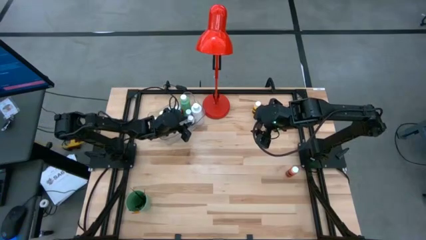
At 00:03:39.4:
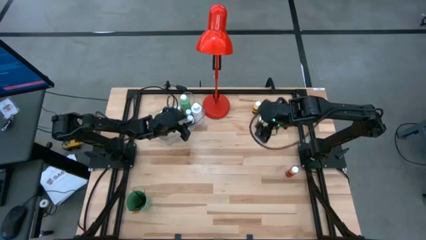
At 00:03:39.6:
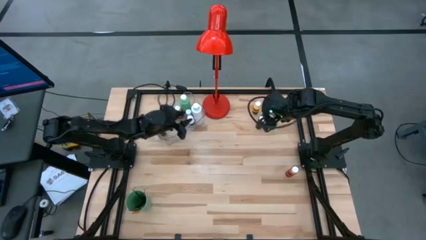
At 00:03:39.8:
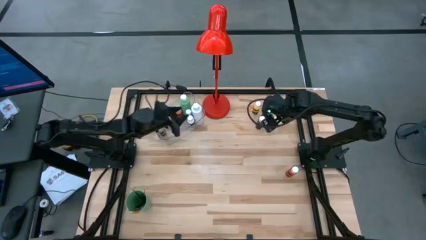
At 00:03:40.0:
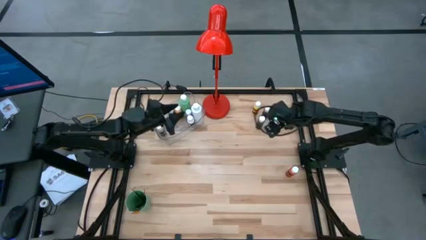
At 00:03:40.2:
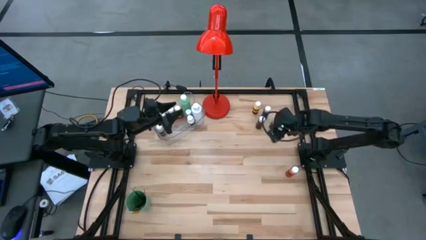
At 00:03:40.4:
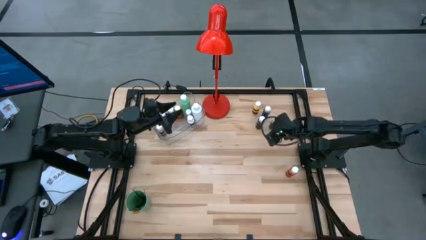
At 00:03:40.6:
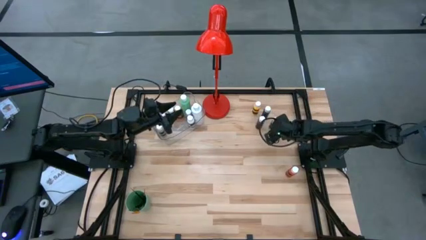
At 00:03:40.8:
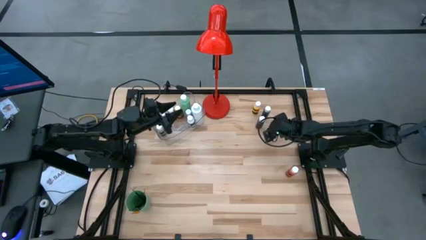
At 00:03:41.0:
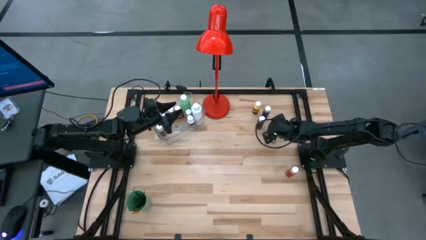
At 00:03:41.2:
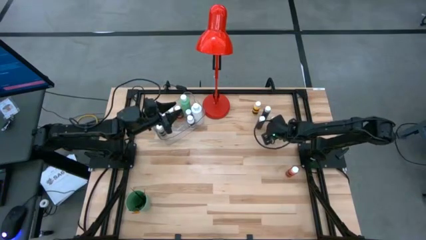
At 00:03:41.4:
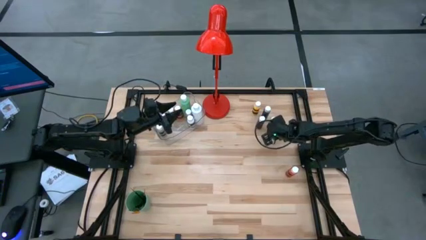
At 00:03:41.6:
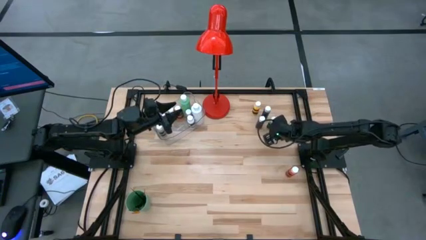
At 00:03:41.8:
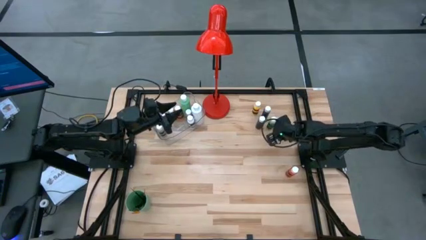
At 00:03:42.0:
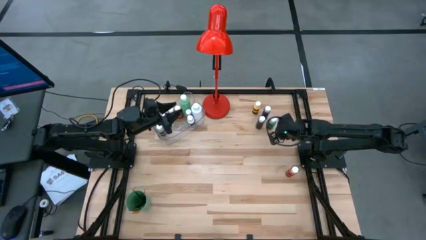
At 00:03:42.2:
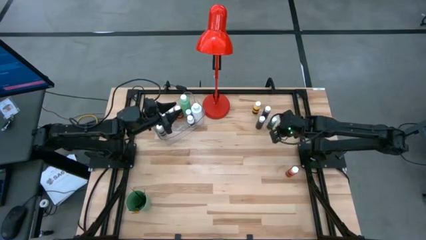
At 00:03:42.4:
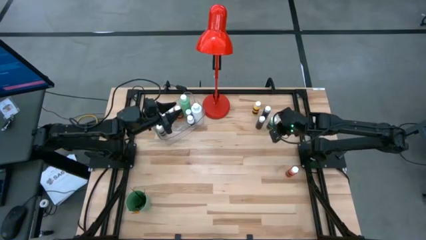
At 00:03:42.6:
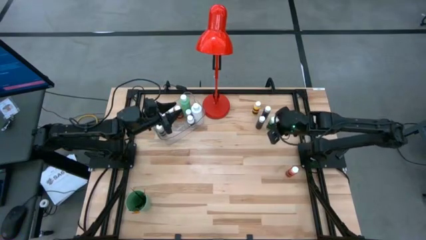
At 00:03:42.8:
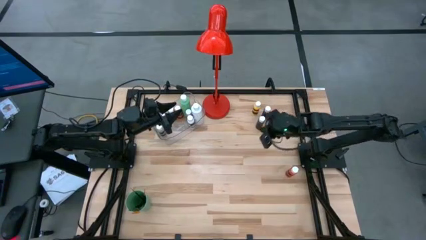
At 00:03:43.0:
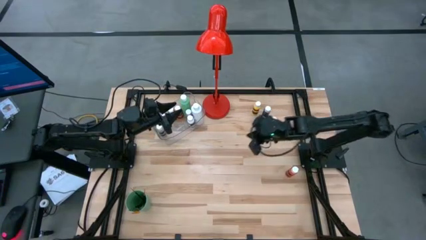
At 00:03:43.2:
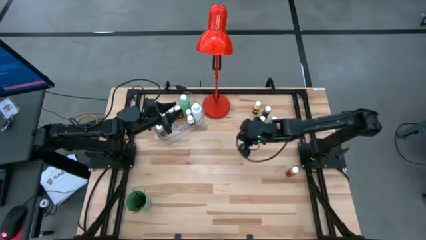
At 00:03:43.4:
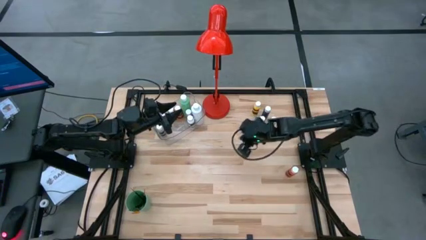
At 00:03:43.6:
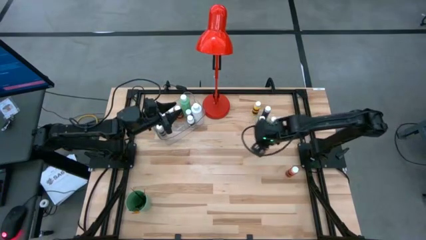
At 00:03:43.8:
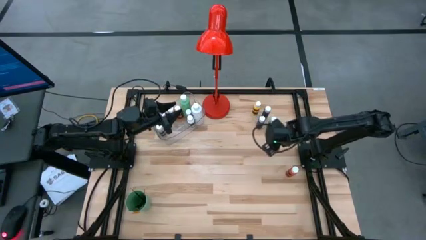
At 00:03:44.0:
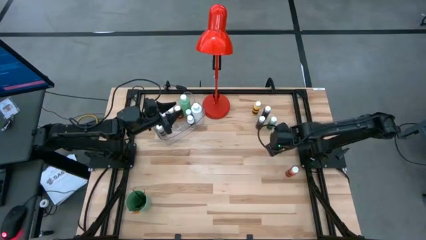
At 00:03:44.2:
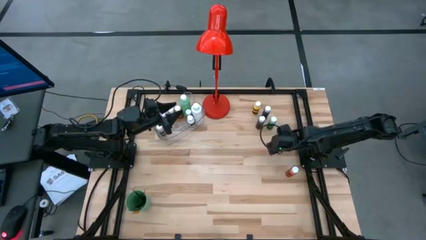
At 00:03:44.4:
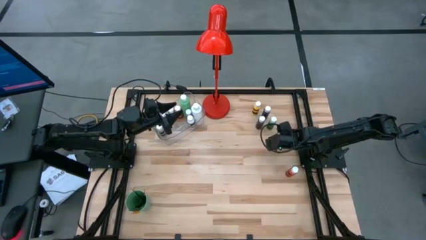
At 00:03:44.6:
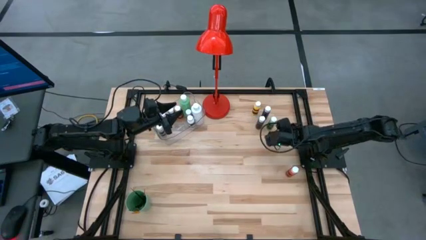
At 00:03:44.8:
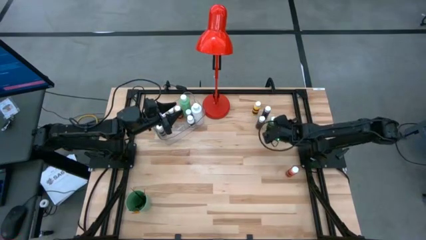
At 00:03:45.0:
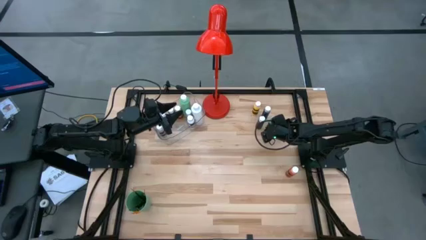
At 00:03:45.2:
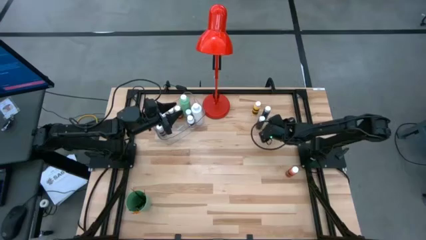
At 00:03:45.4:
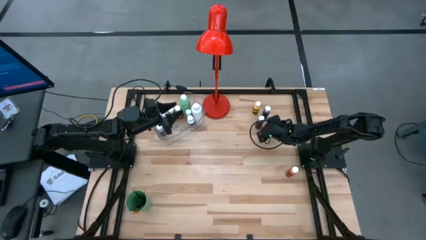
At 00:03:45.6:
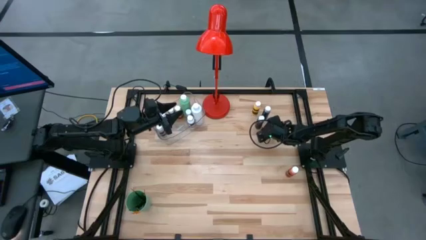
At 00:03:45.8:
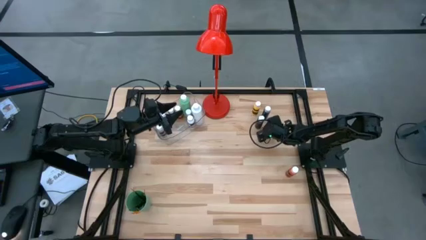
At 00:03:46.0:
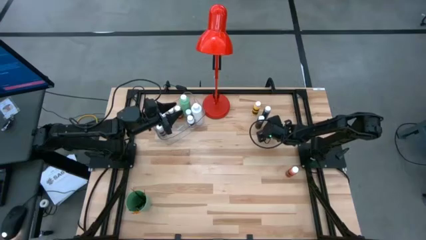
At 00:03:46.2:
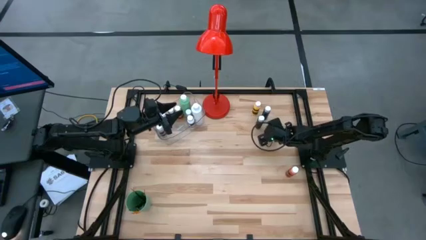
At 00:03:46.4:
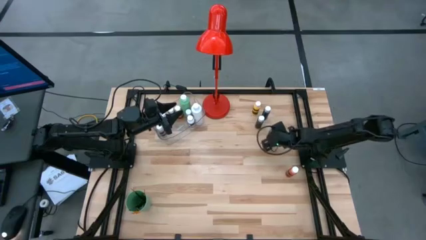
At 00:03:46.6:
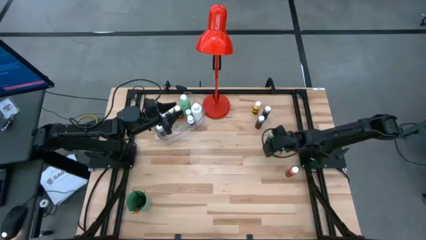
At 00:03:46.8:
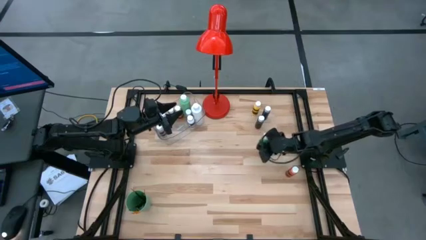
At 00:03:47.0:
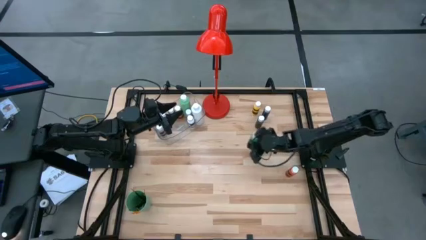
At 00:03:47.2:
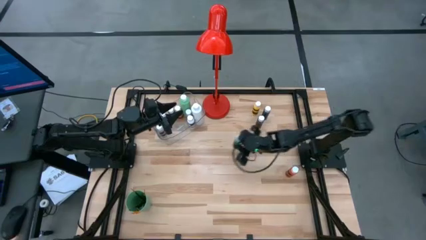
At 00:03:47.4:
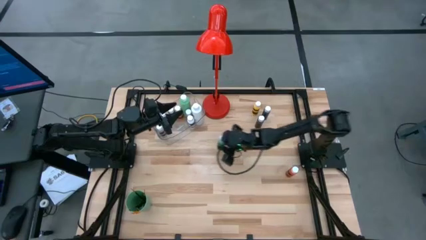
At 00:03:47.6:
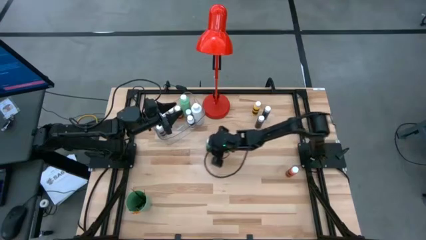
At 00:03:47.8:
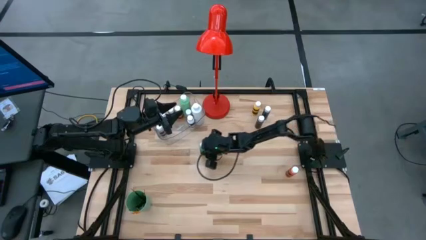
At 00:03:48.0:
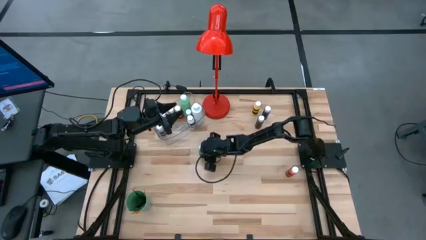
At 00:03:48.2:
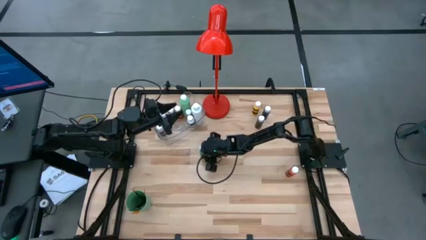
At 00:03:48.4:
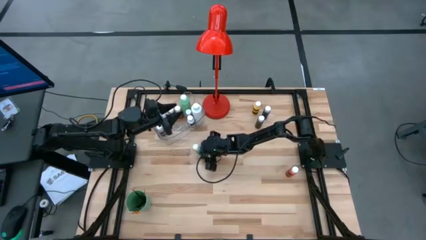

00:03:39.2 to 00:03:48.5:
Task: Pick & Place Paint Supplies
Put the green paint bottle into the transparent bin

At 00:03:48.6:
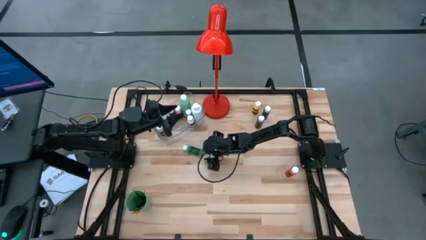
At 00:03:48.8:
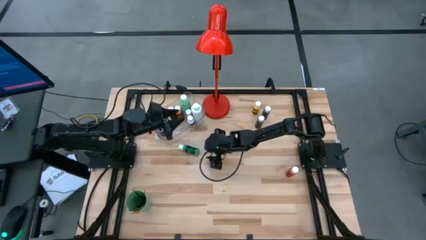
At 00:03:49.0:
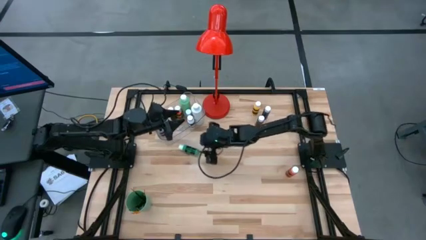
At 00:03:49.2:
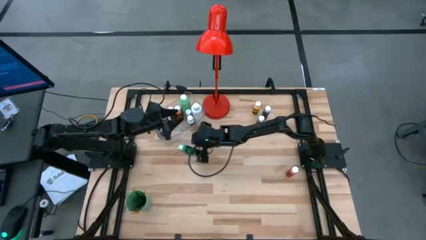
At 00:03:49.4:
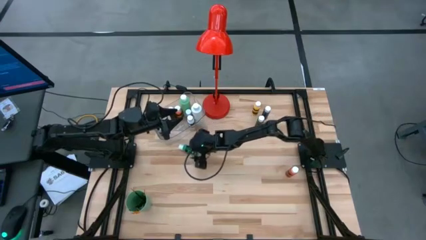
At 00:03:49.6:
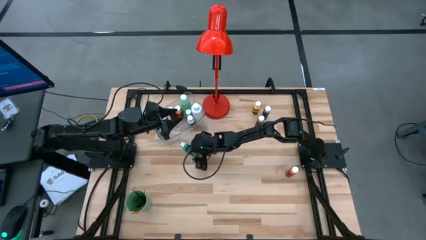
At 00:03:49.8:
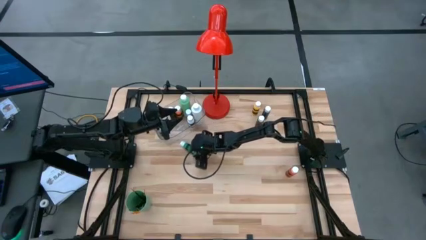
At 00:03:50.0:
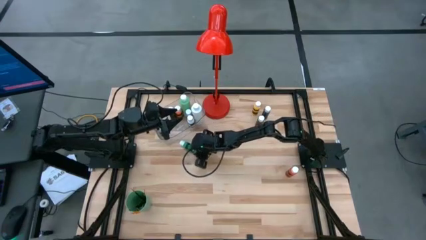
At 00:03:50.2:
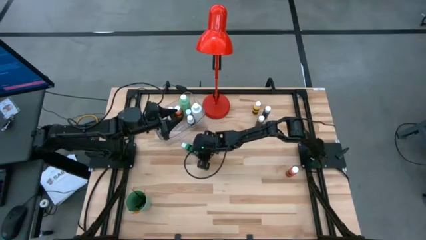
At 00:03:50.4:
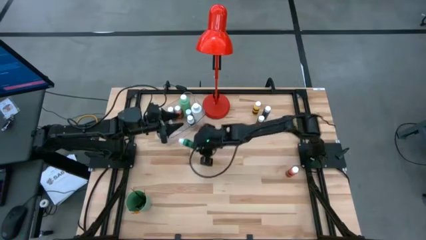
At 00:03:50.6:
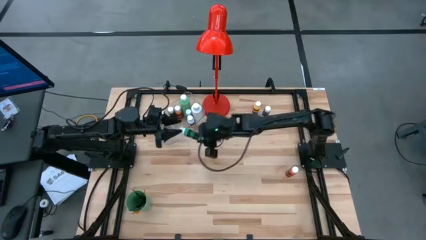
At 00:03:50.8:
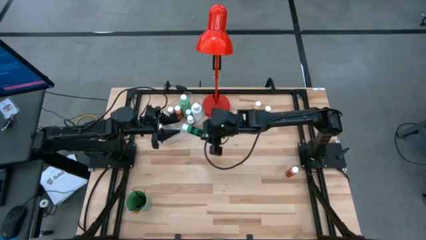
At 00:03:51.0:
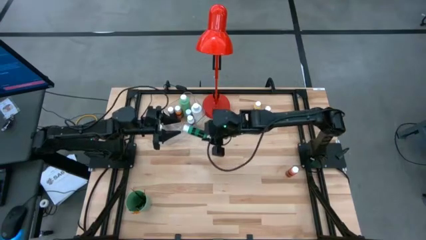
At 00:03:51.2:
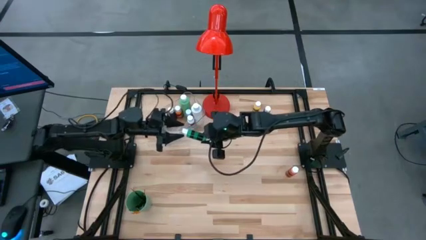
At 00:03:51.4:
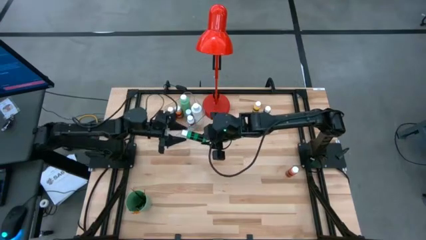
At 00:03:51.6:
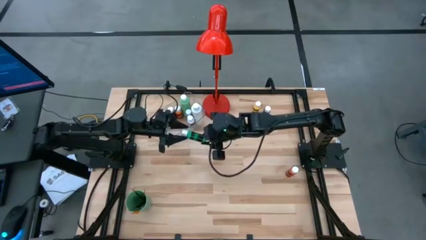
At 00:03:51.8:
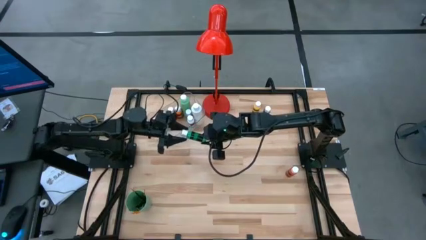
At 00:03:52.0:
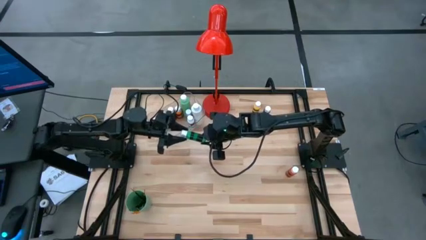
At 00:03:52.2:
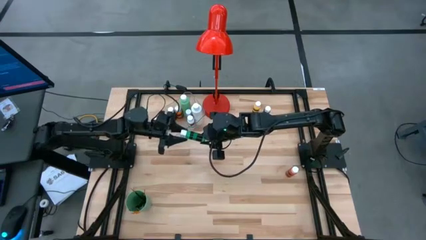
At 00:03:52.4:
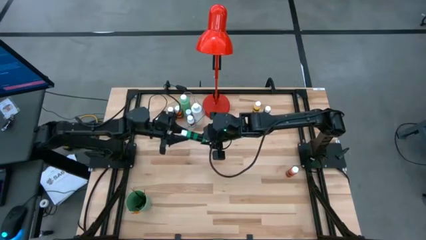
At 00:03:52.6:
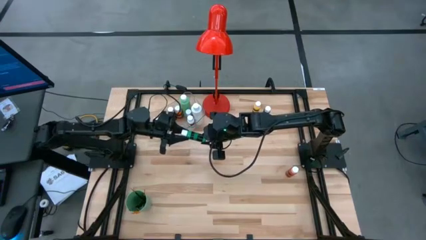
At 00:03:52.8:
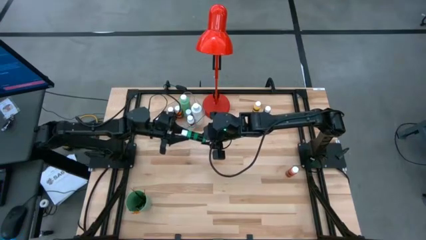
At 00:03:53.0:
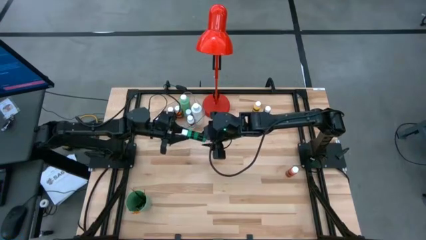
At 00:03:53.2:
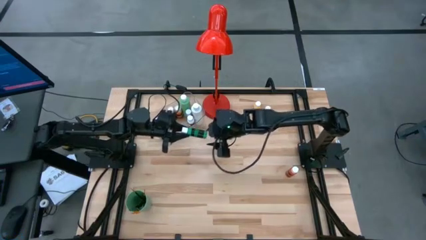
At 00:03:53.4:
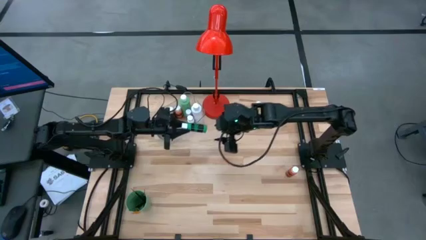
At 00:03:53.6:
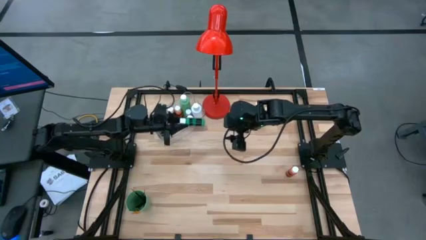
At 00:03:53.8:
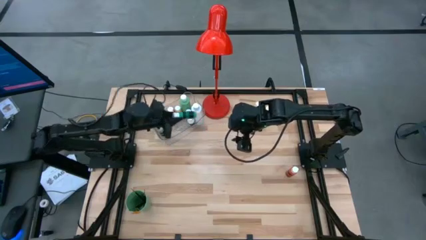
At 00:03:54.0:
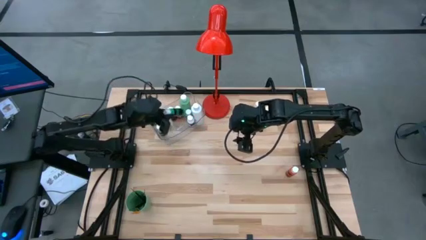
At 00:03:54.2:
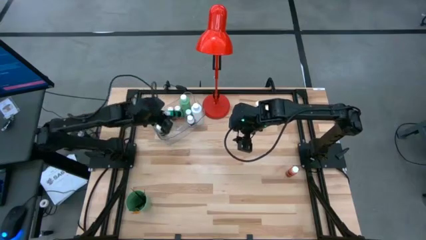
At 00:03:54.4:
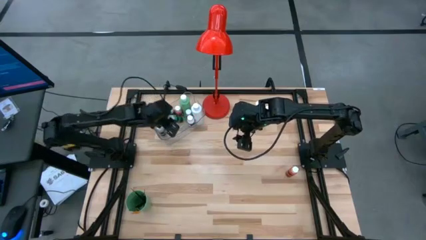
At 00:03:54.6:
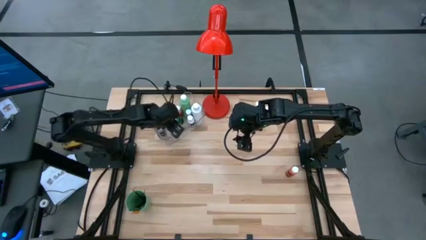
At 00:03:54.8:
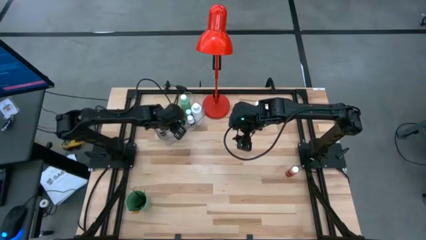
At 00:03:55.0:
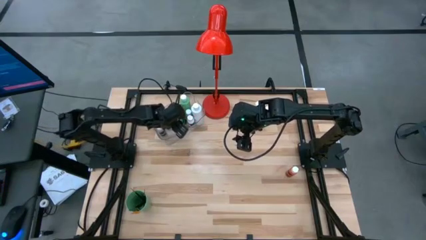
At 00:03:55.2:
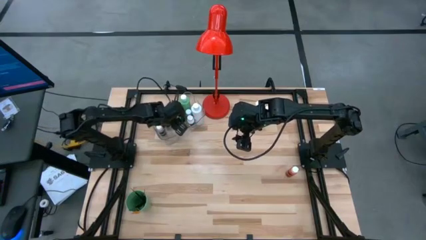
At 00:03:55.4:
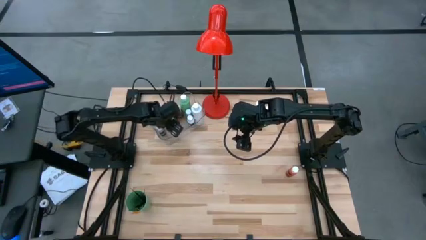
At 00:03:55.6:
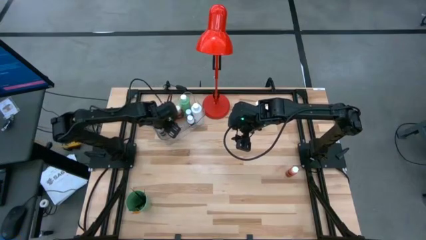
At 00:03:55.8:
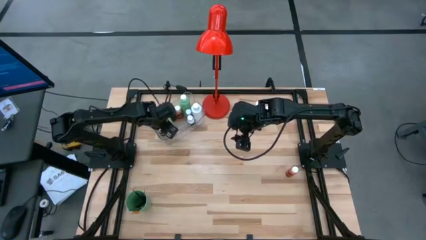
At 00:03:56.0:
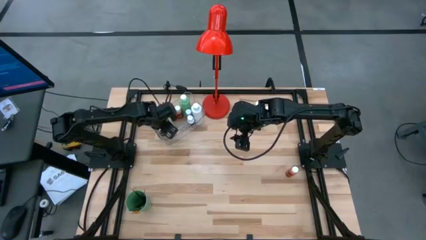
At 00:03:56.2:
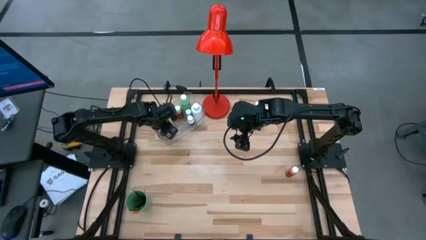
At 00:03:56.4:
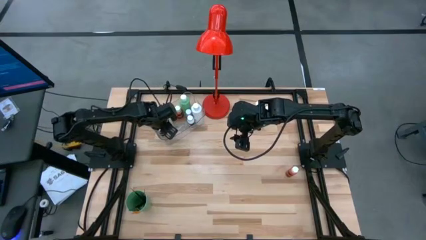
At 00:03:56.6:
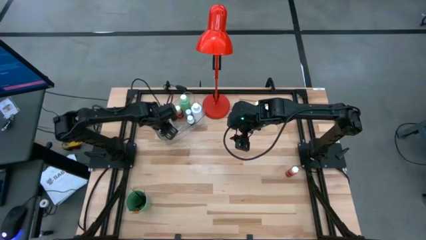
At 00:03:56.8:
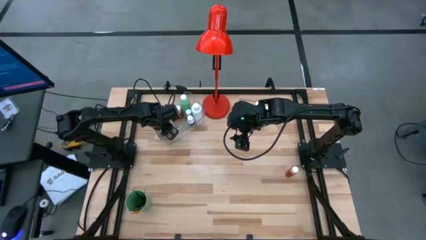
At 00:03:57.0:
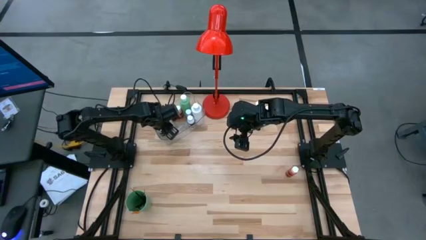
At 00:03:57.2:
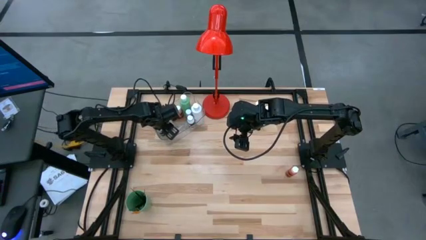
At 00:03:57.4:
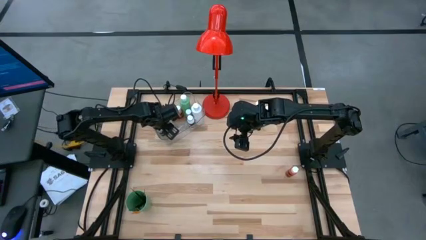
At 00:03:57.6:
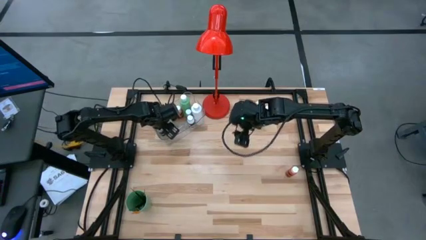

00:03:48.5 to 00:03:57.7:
Put the green paint bottle into the transparent bin
